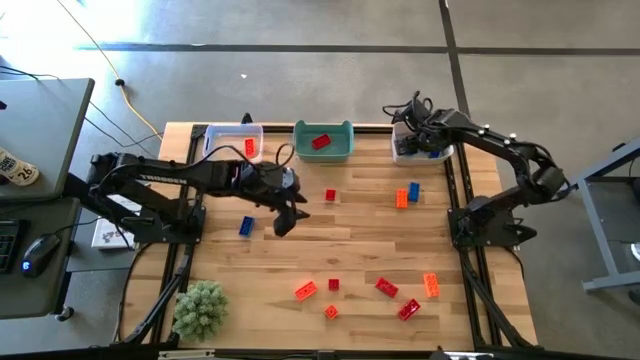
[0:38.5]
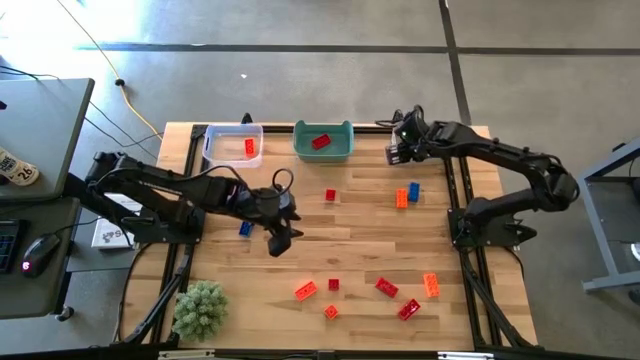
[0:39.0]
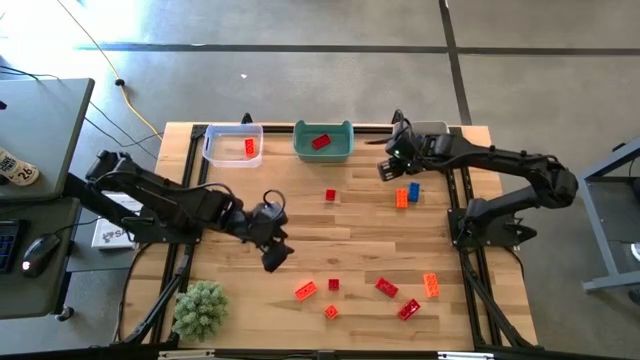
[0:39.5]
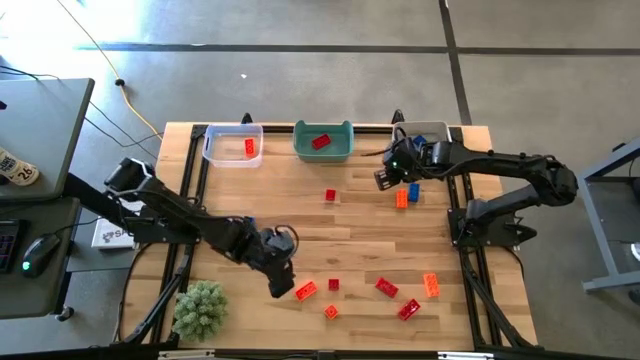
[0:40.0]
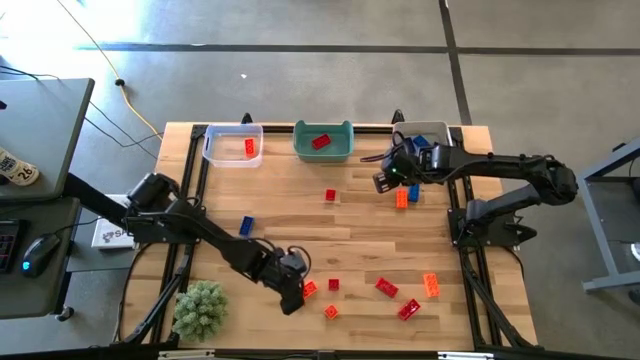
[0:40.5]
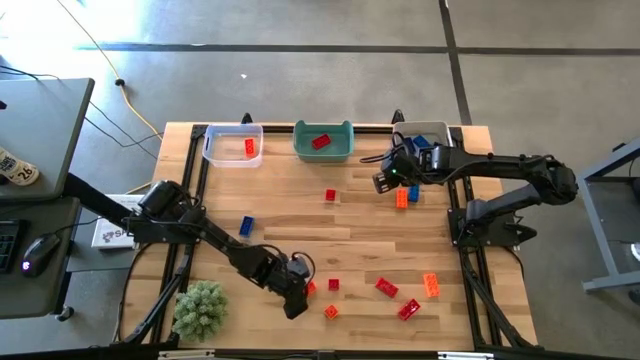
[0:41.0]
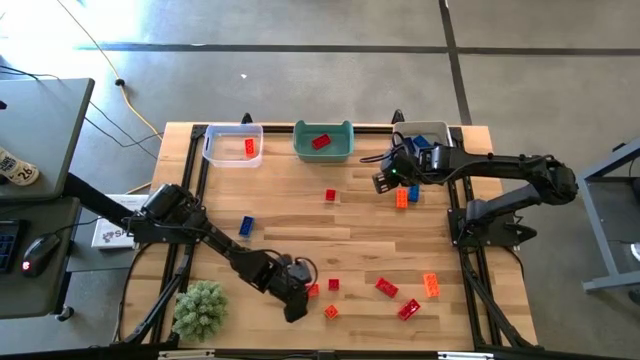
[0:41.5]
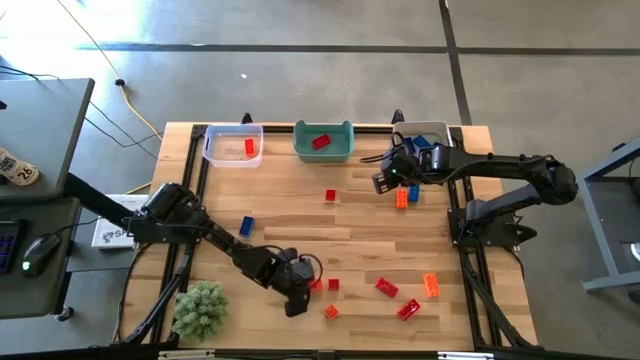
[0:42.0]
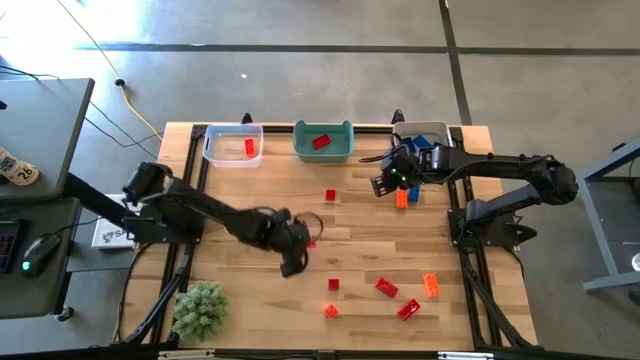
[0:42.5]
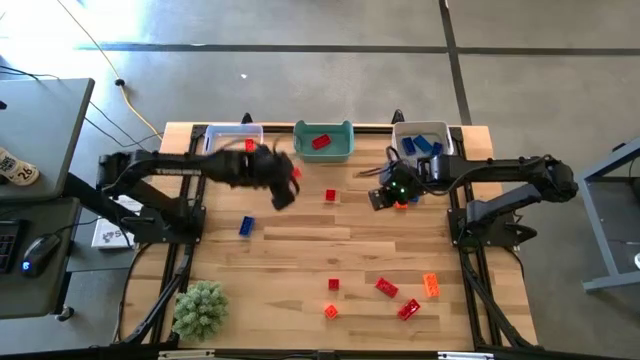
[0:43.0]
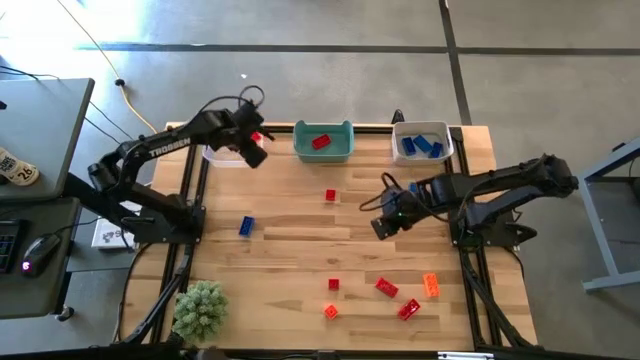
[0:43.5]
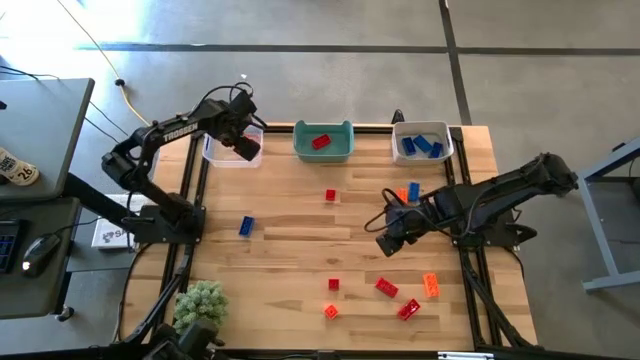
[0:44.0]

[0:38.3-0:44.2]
Task: Sort & place blocks by color
Put the orange game piece into the transparent bin

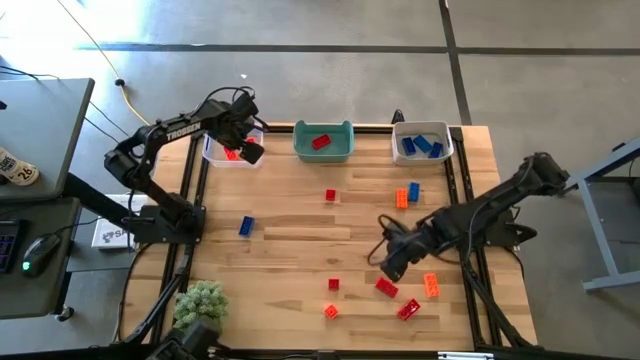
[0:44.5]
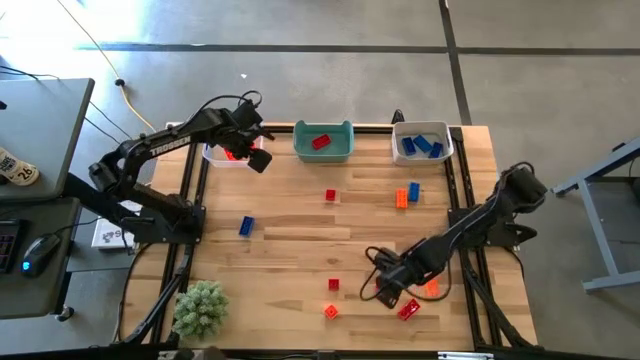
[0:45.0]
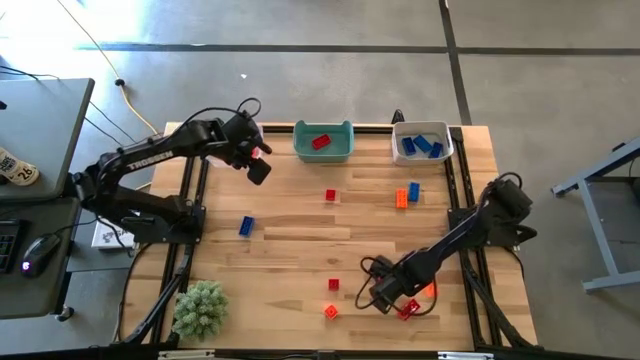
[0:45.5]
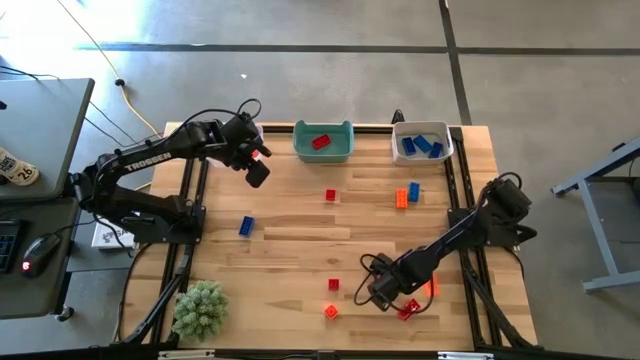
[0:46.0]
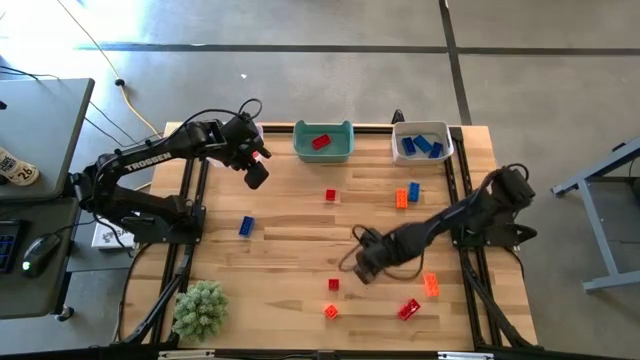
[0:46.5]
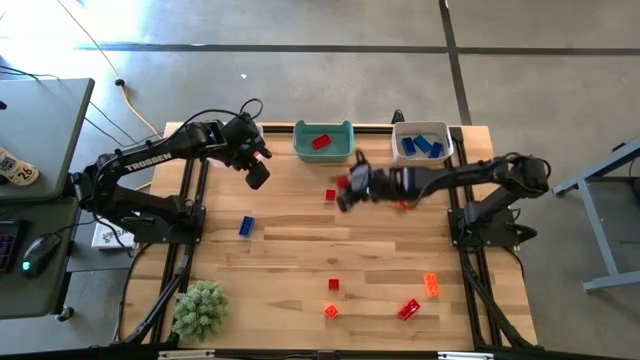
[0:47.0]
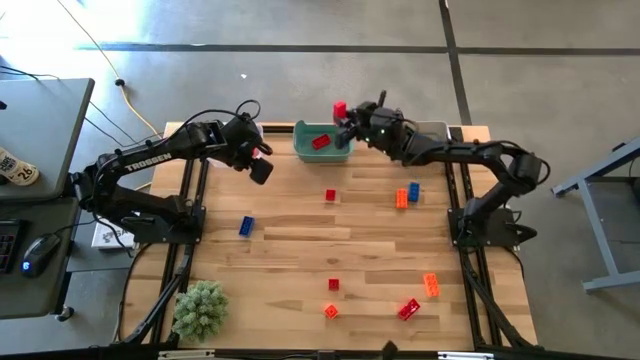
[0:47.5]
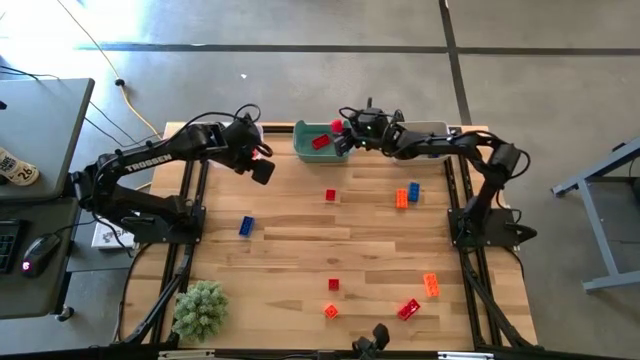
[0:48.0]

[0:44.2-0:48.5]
Put the red game piece into the green bin

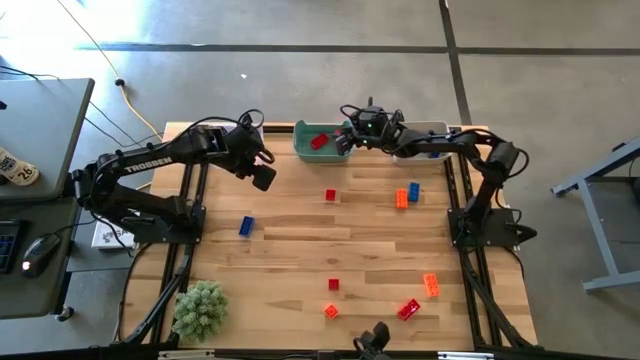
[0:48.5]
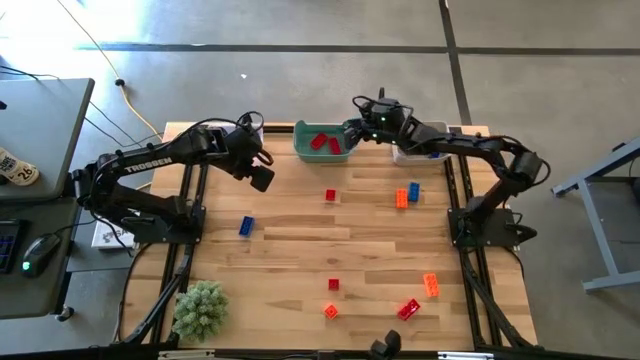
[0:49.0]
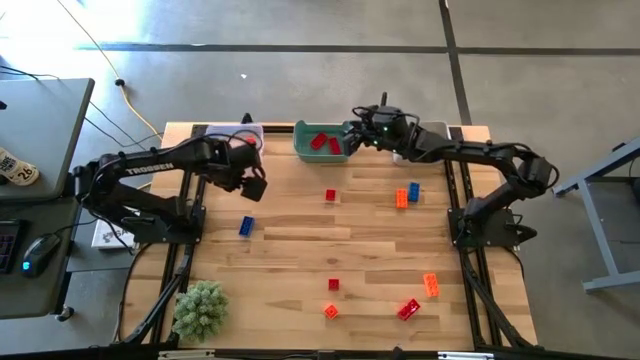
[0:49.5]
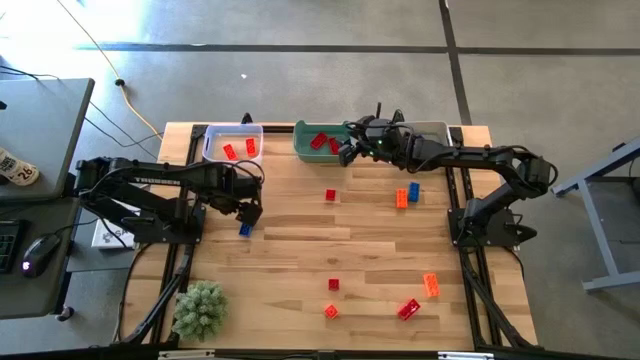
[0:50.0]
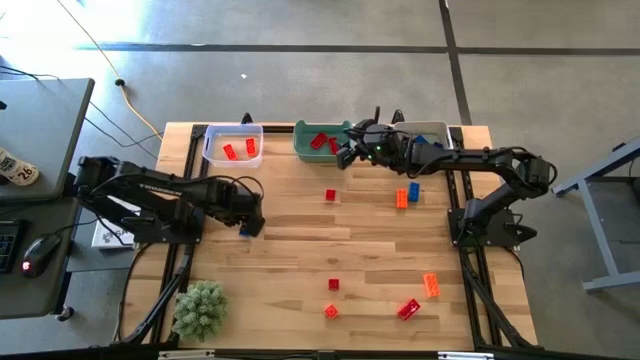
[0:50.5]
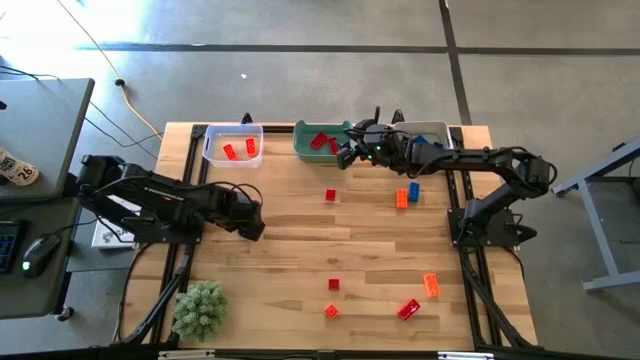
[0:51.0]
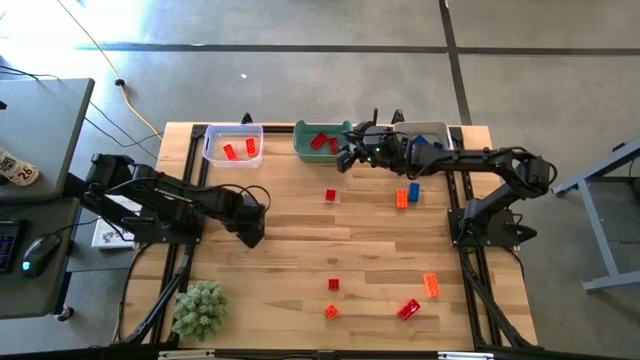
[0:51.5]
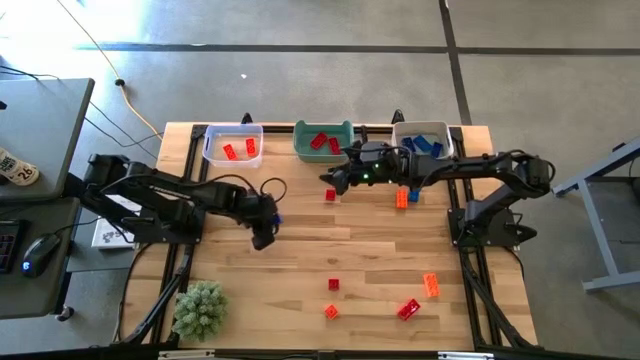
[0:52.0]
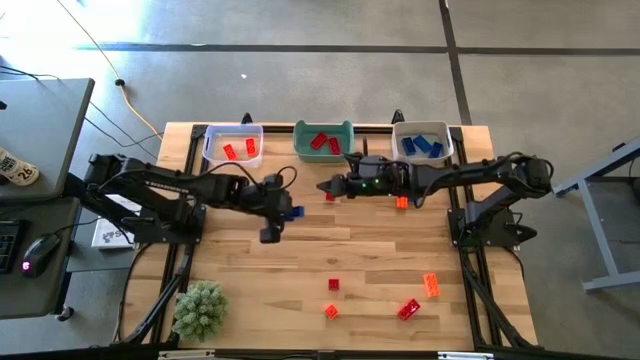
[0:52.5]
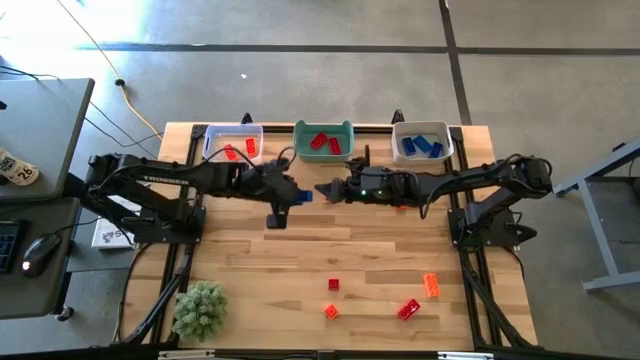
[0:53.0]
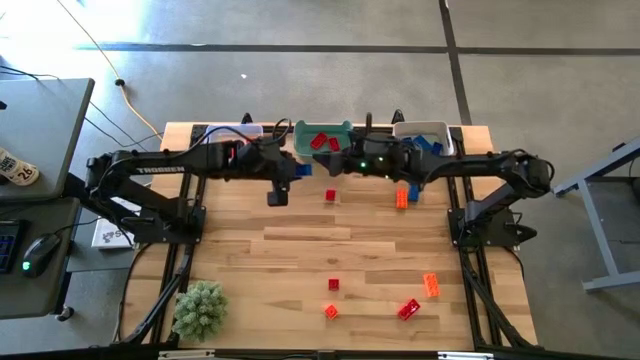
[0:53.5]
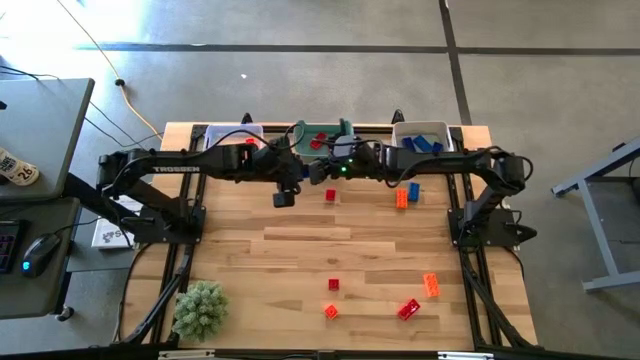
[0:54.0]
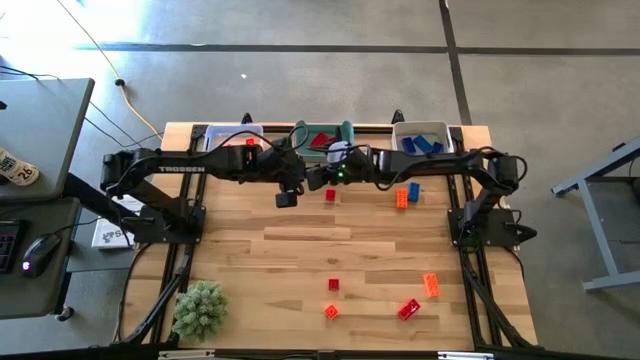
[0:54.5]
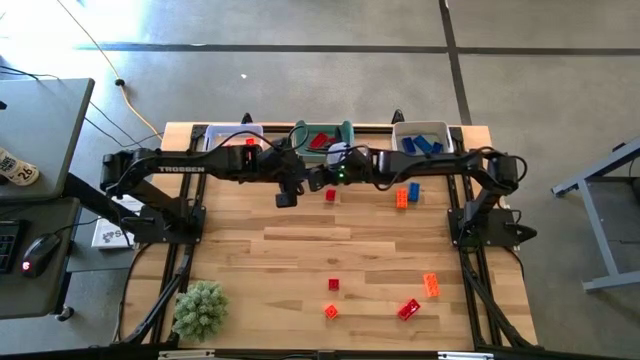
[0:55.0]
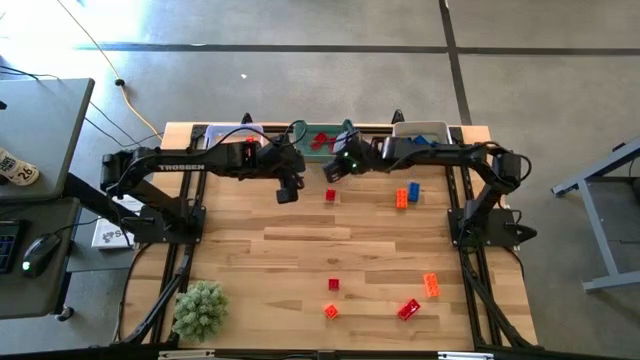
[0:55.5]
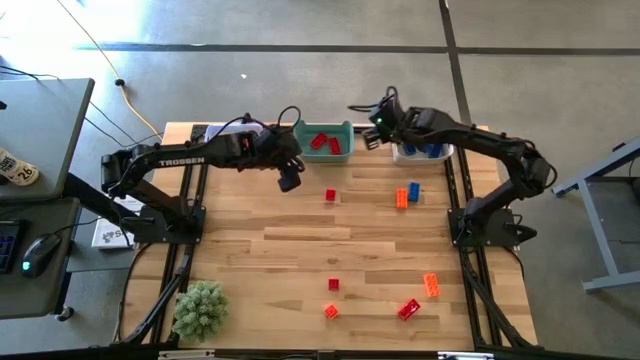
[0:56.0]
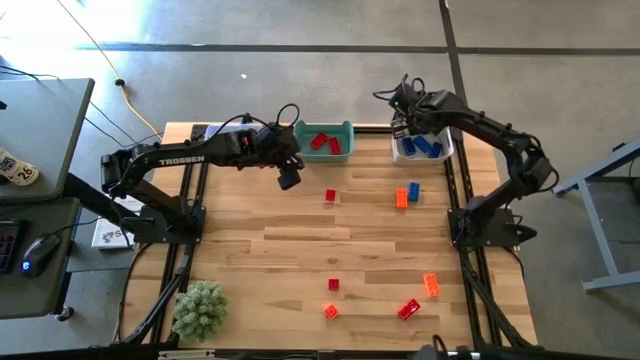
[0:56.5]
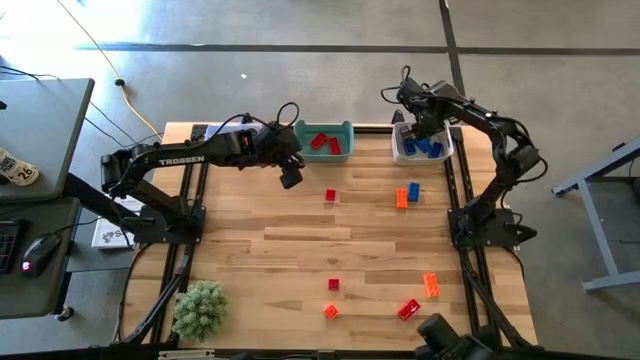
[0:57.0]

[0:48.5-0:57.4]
Put the blue game piece into the white bin

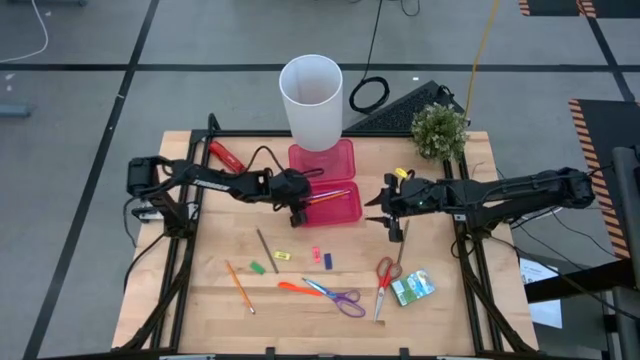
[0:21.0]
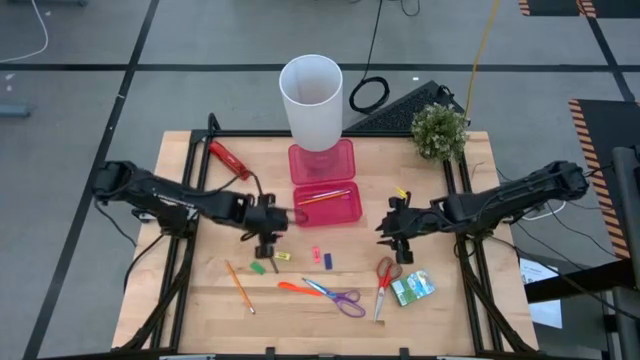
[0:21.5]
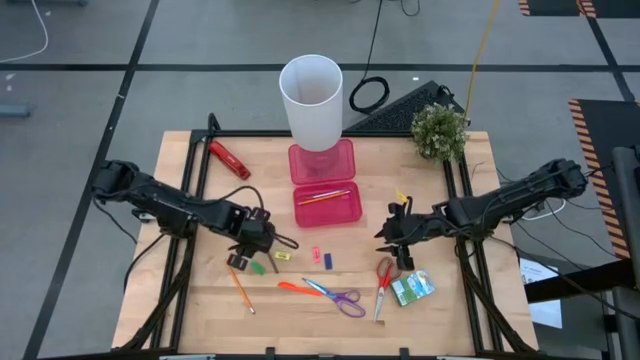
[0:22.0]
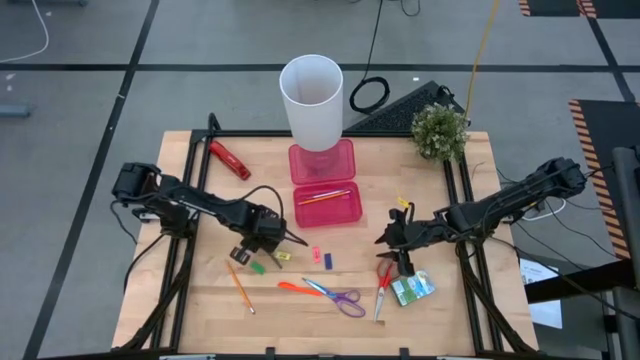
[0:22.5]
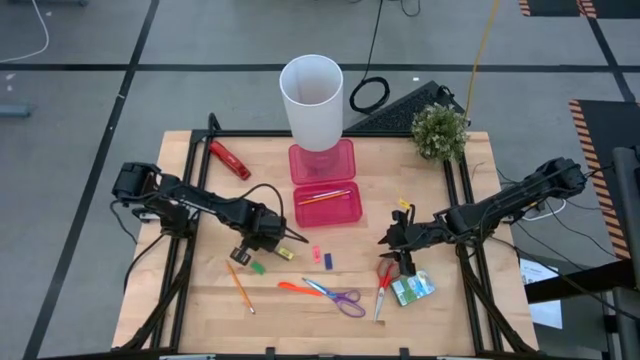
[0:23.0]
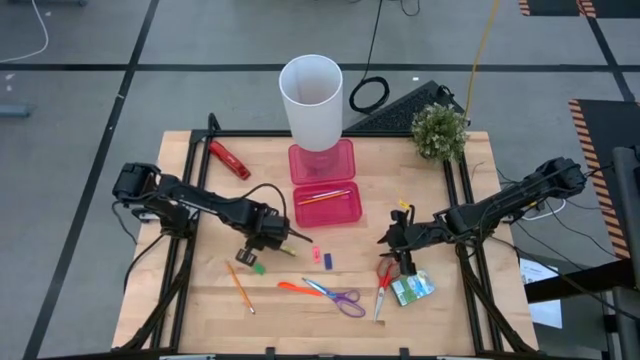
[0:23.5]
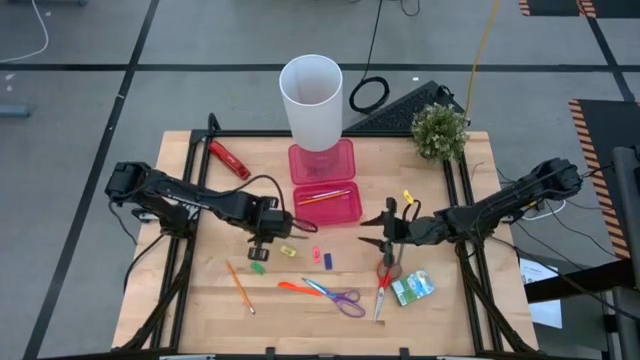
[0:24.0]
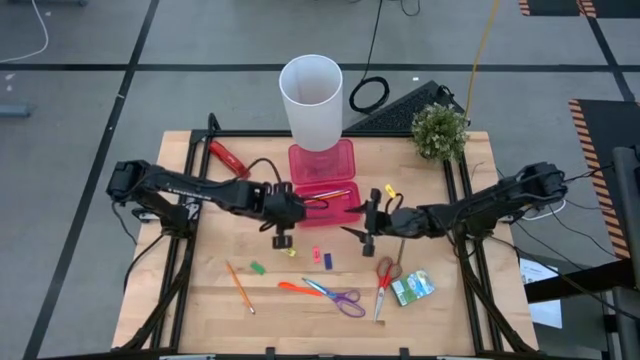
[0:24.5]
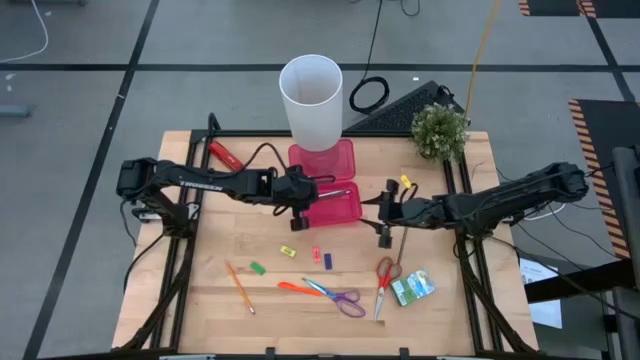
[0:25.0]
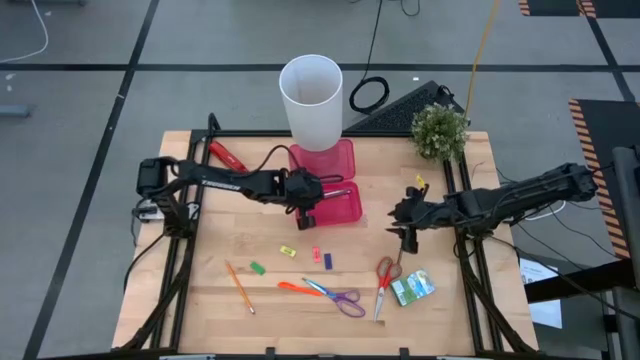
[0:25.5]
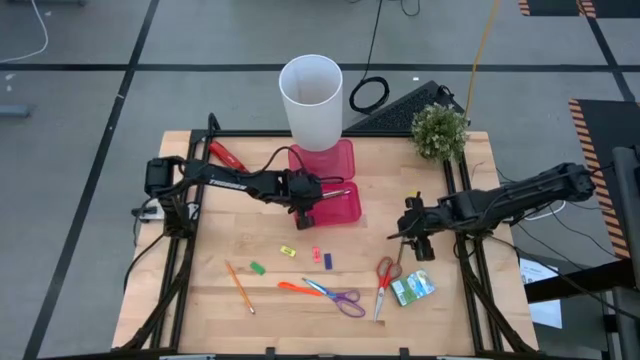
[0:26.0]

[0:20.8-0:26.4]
Task: Pack school essentials
Put the left black pencil into the pink supply box
